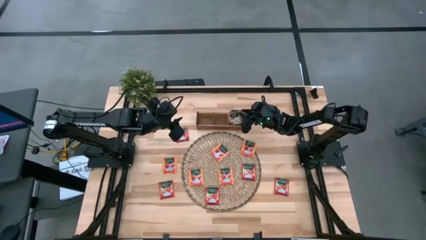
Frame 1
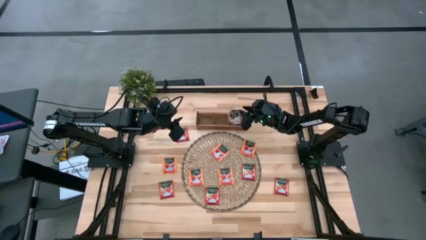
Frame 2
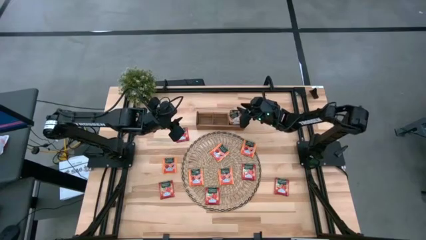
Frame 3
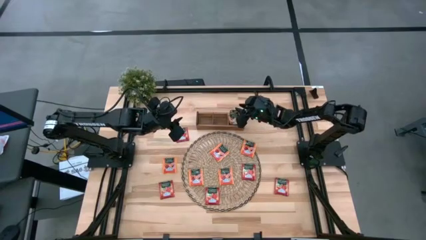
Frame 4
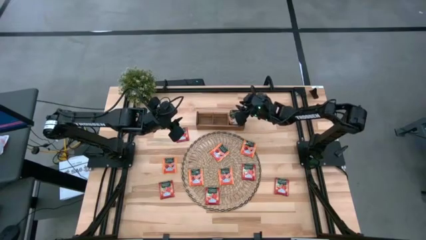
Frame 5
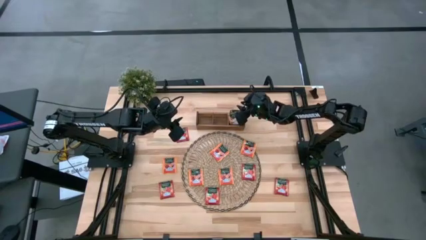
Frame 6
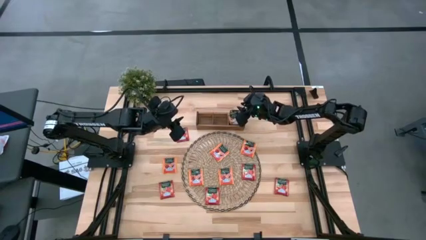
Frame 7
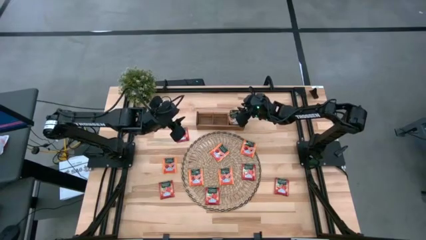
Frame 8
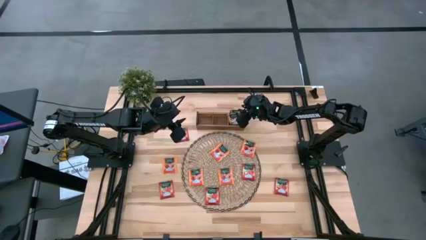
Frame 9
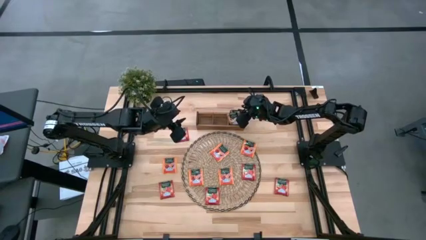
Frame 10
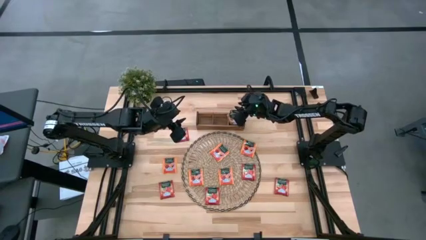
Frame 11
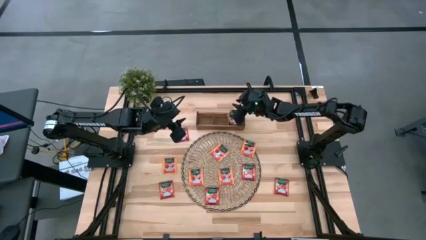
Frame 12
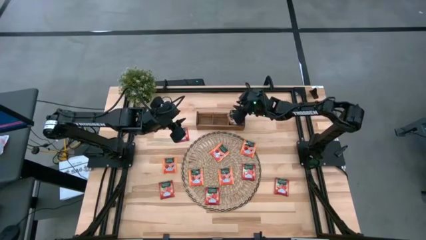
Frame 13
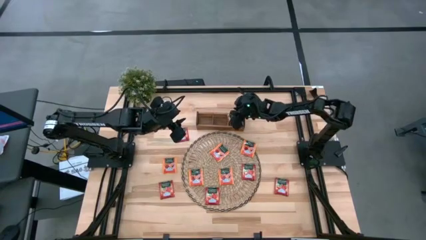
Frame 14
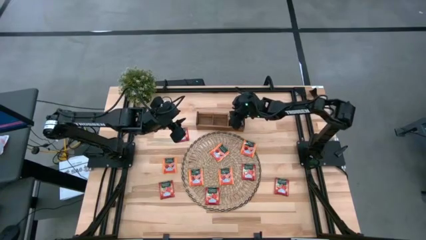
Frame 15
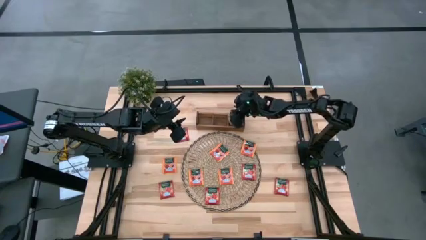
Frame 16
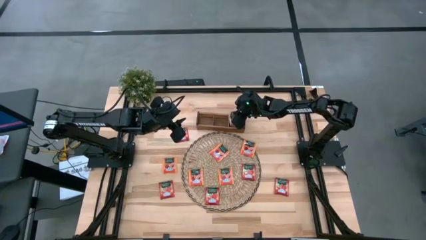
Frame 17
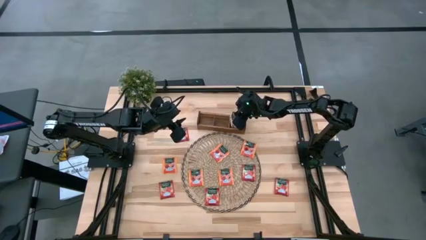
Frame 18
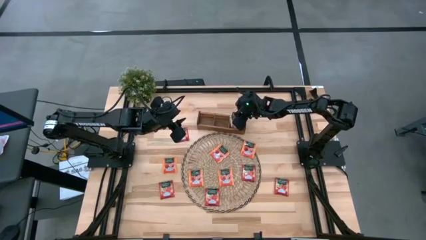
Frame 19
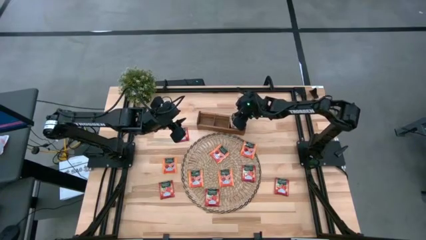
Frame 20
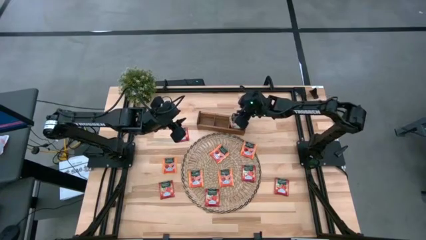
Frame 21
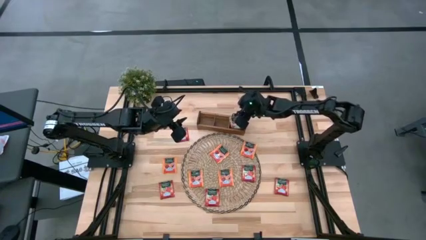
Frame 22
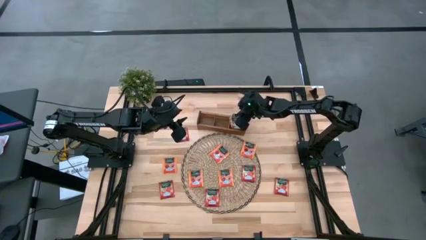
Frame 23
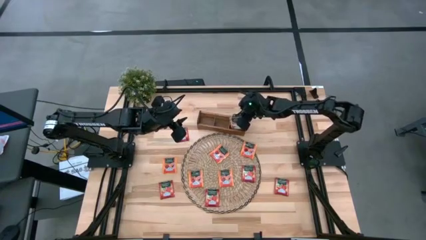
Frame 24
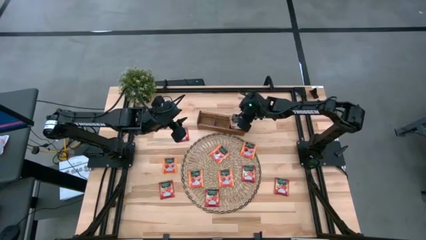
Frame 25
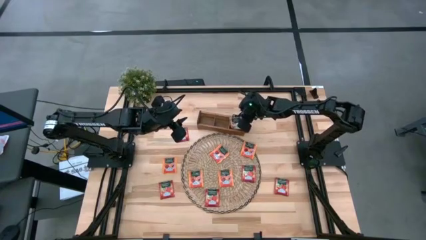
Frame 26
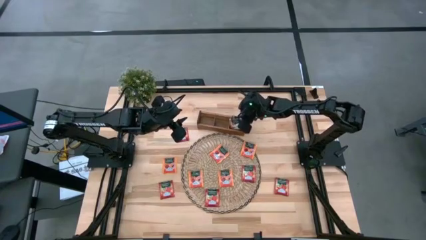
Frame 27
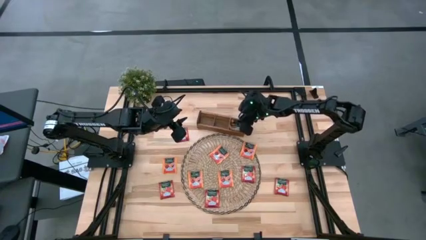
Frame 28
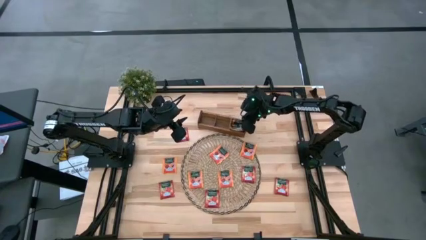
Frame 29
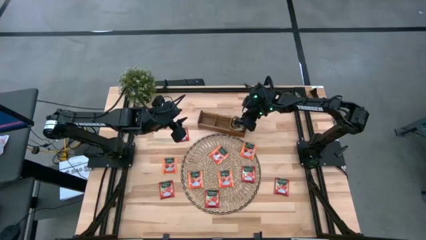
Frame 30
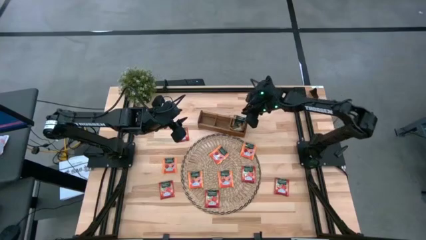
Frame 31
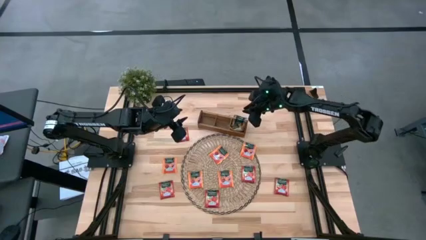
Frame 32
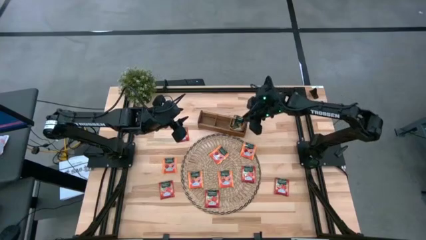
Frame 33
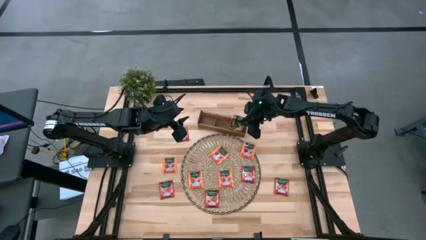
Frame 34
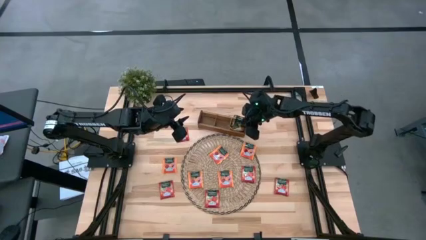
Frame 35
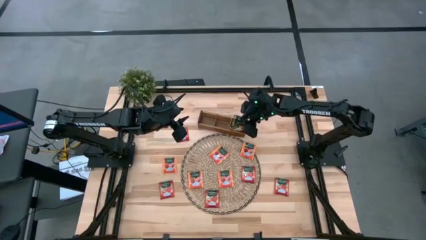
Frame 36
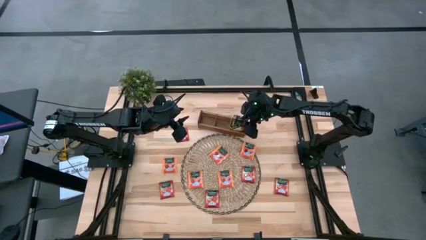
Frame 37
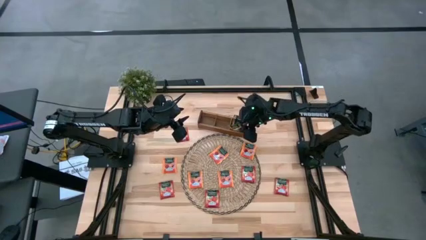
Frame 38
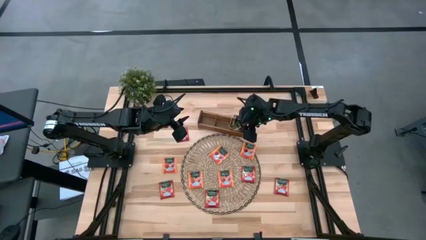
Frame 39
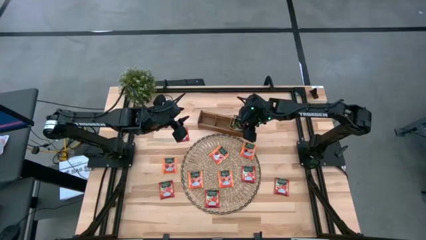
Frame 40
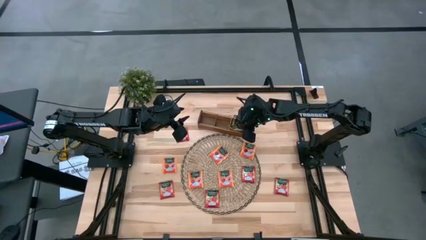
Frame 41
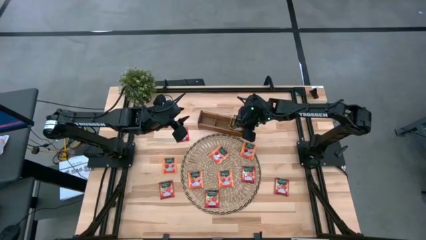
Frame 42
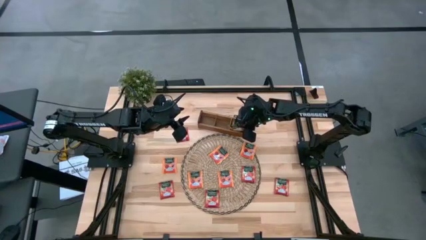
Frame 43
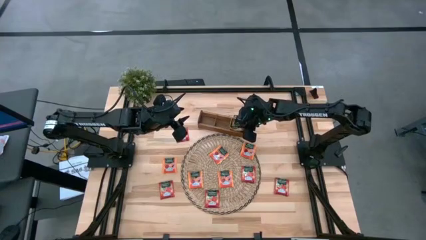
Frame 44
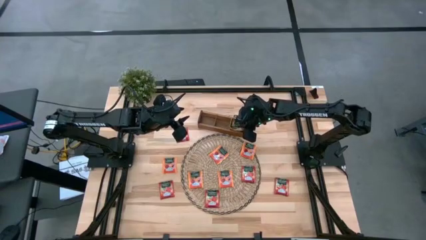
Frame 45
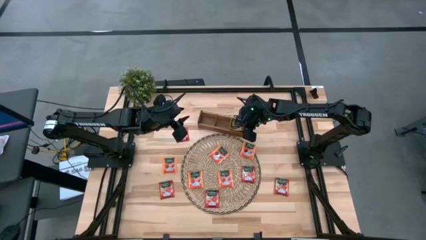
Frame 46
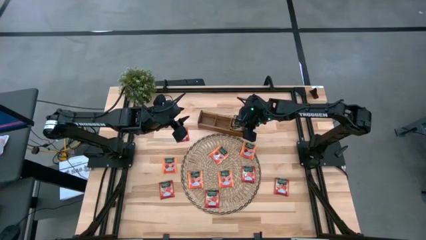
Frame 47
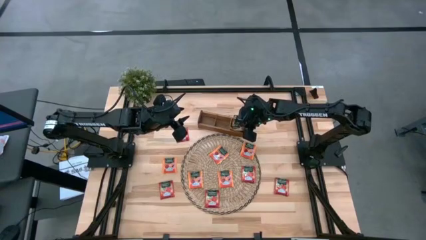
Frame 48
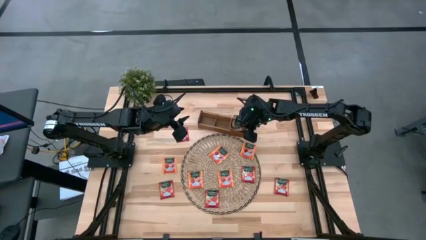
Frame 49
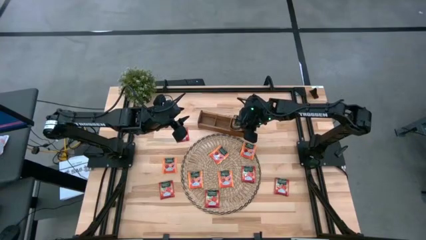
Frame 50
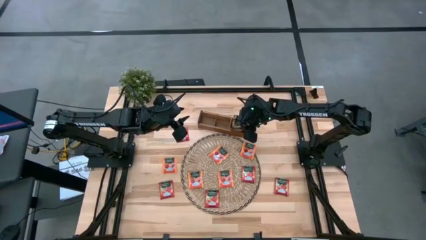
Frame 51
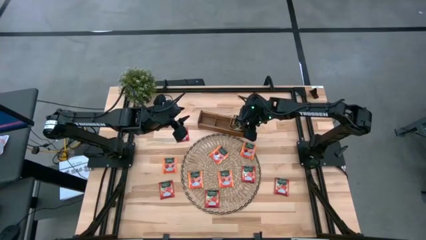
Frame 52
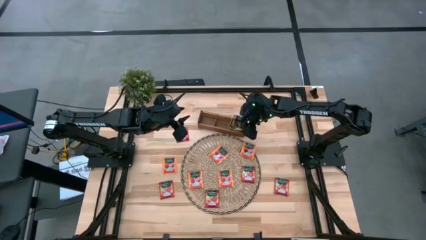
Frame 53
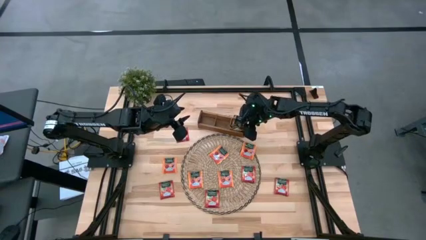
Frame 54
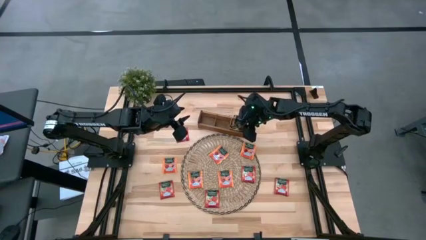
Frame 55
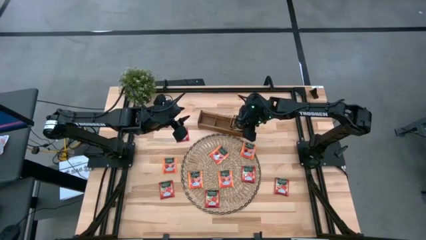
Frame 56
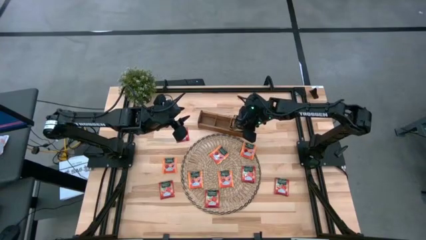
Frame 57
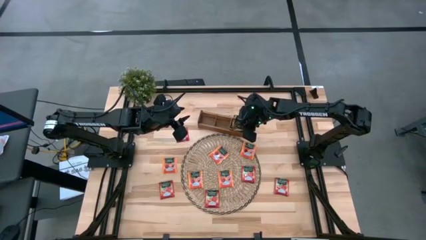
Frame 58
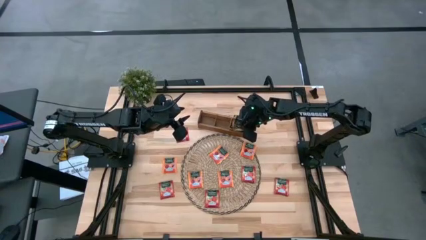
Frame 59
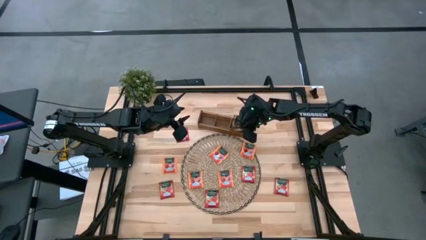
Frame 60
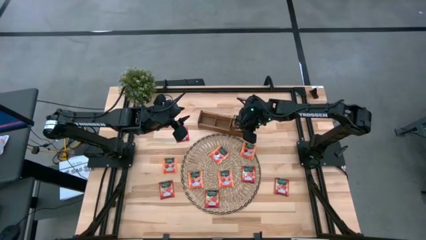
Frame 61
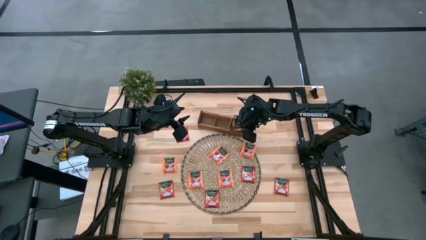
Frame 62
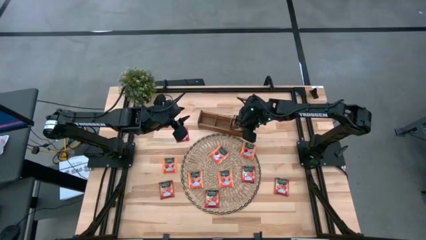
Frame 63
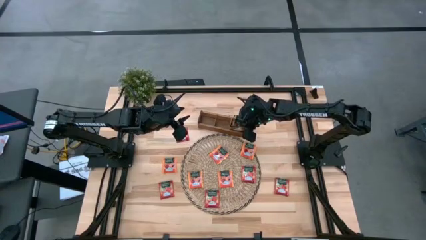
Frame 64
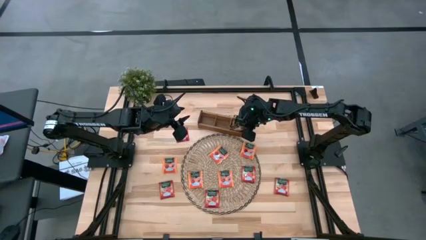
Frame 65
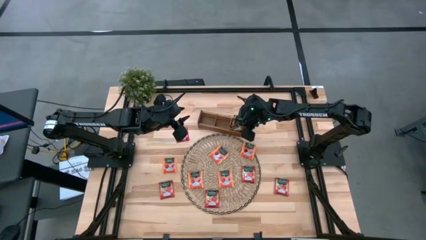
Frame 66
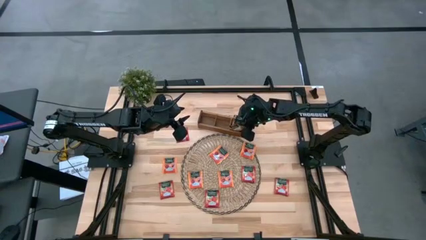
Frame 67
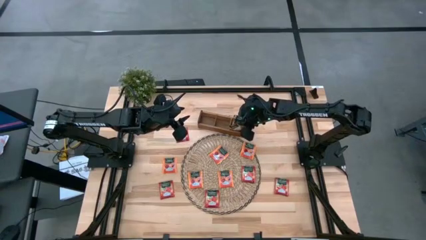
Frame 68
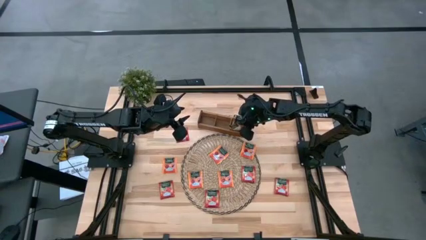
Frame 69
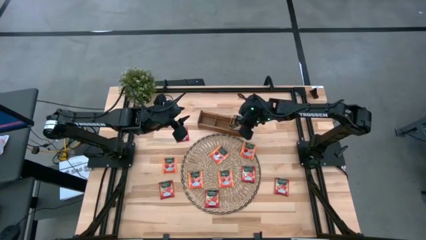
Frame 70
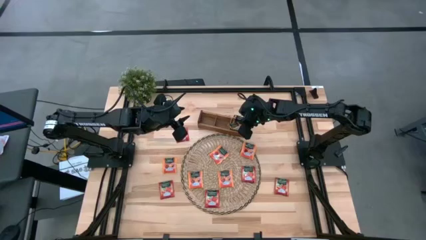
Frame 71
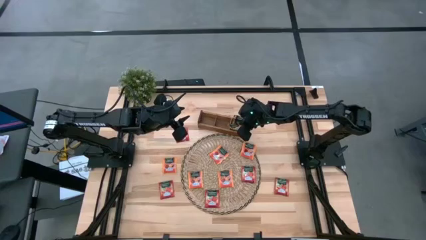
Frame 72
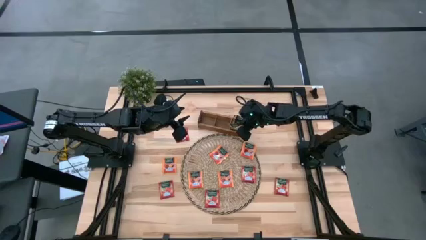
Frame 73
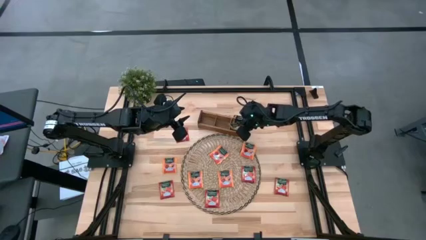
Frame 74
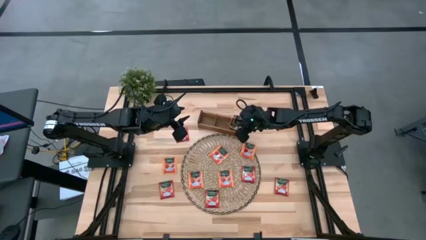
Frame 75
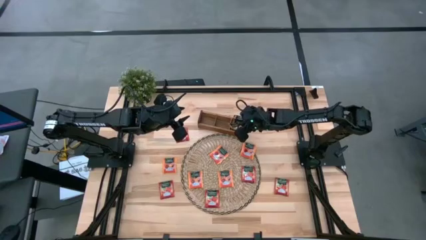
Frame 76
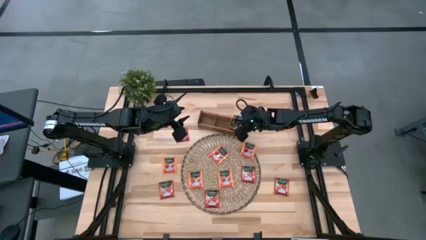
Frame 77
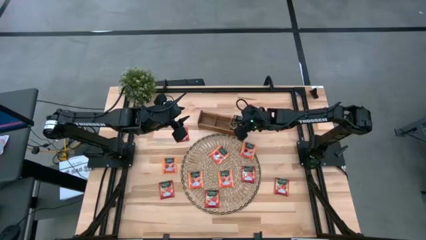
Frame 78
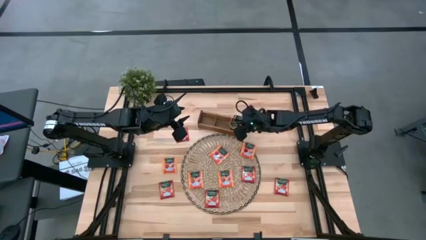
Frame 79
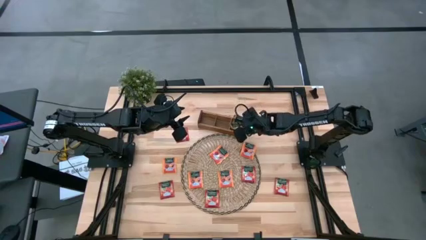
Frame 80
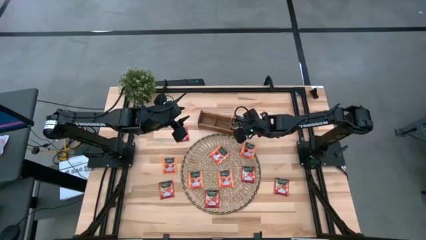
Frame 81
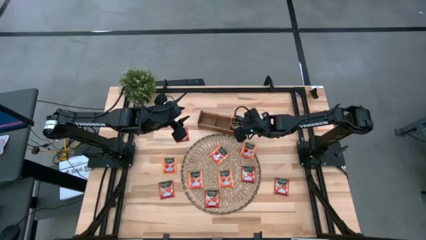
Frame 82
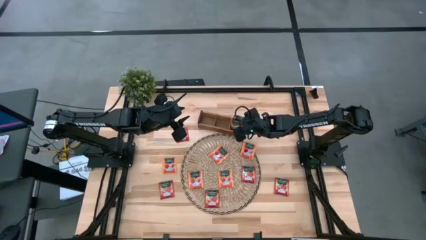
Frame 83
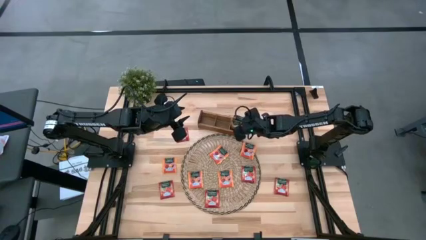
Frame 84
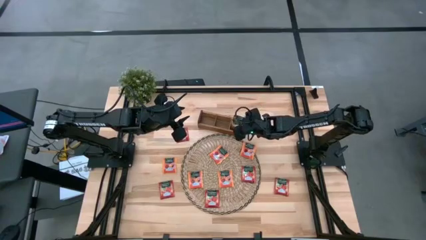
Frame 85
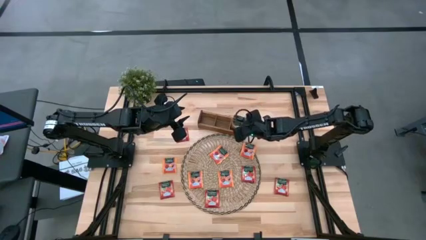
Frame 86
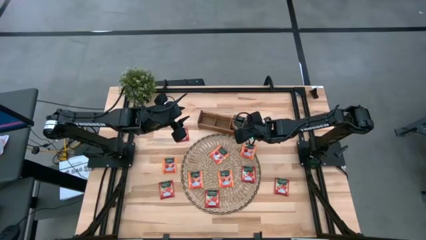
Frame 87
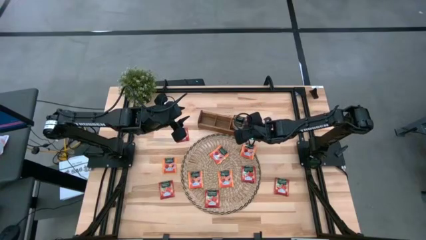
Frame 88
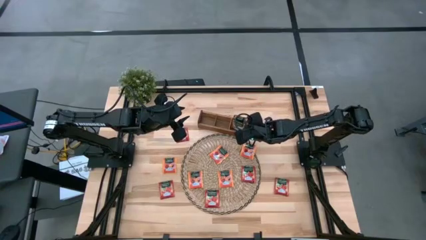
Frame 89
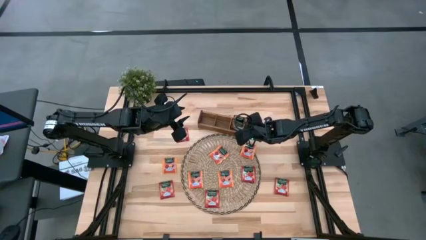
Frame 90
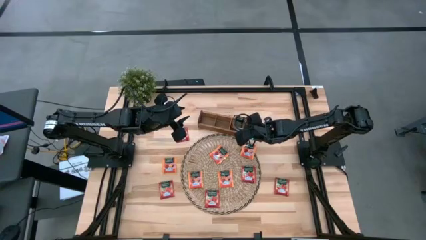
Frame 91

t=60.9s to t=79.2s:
Task: Pick & Place Tea
Adjust the brown tea bags in the wooden organizer
